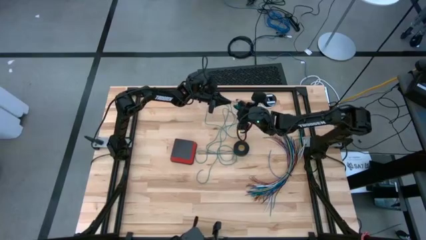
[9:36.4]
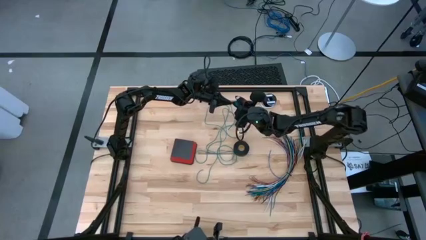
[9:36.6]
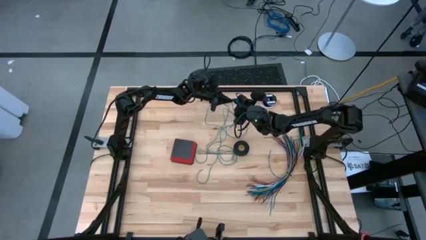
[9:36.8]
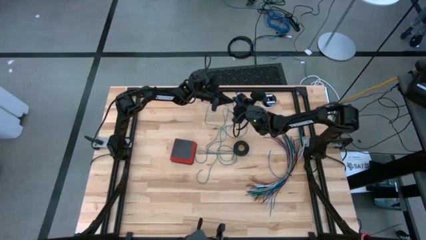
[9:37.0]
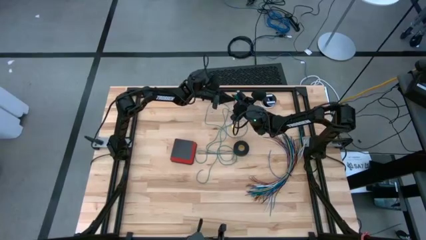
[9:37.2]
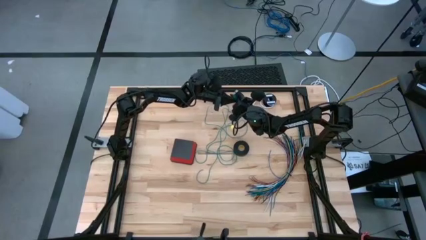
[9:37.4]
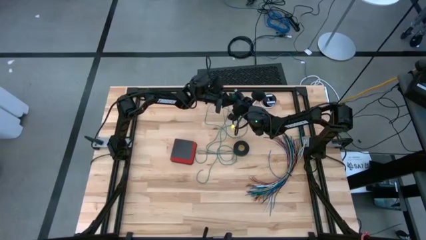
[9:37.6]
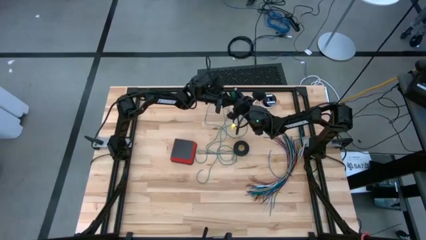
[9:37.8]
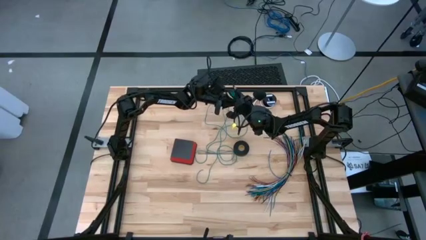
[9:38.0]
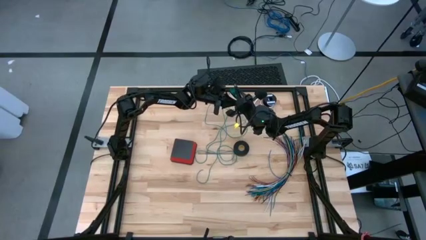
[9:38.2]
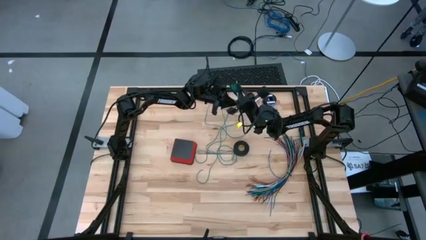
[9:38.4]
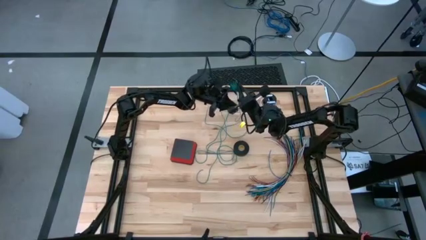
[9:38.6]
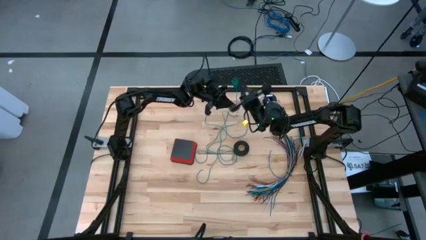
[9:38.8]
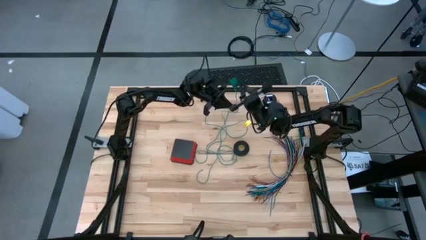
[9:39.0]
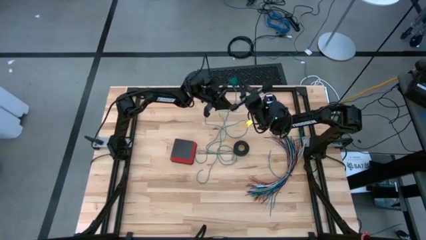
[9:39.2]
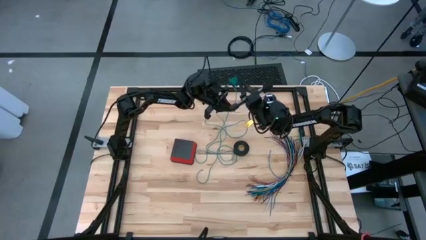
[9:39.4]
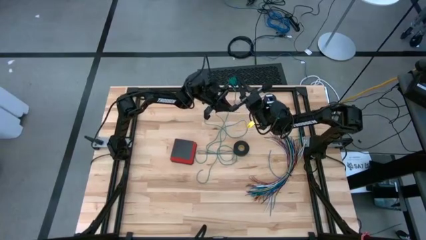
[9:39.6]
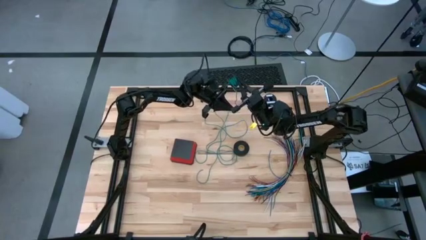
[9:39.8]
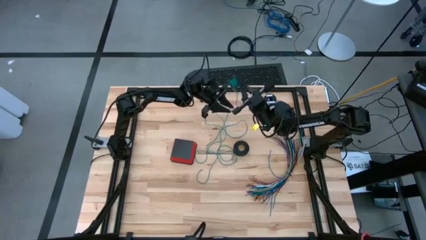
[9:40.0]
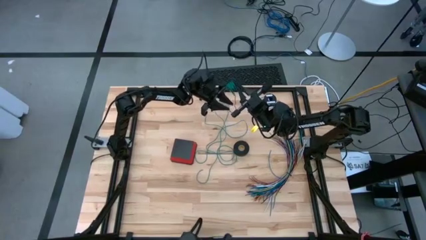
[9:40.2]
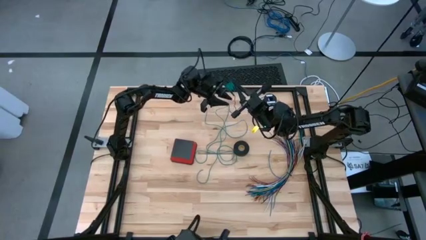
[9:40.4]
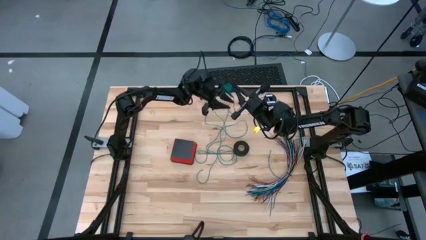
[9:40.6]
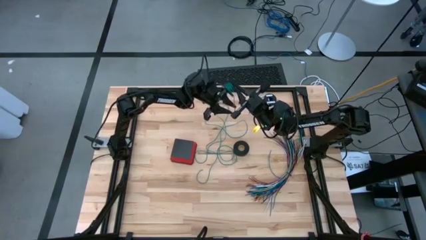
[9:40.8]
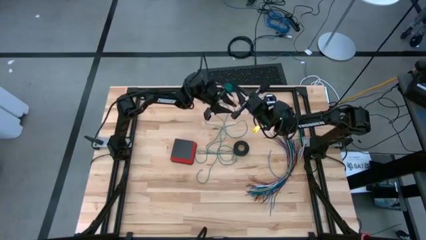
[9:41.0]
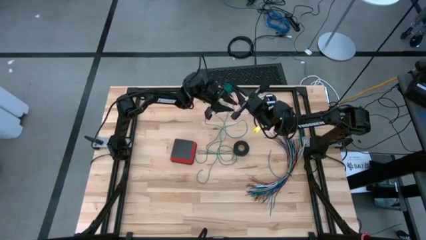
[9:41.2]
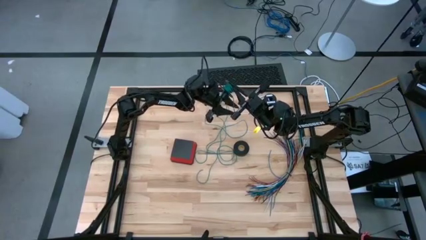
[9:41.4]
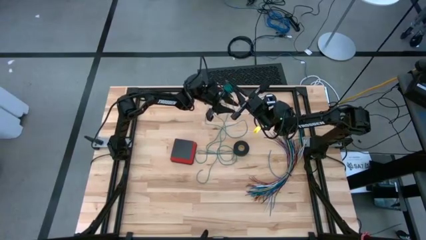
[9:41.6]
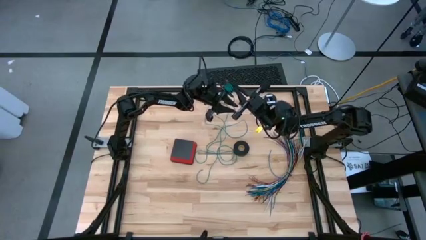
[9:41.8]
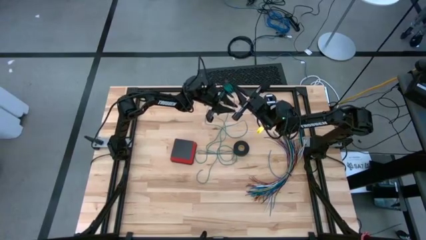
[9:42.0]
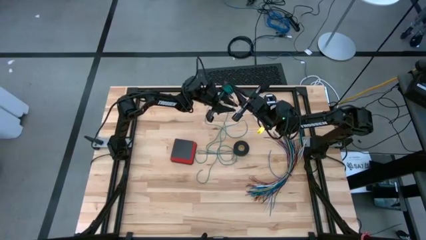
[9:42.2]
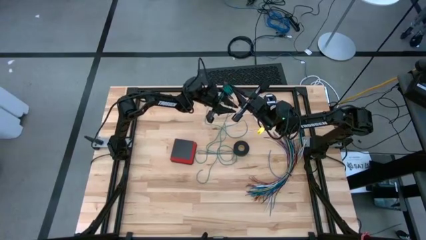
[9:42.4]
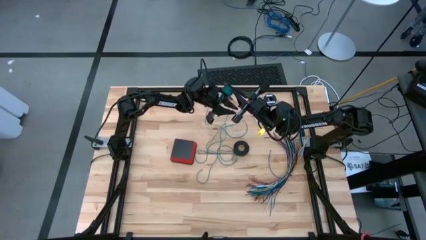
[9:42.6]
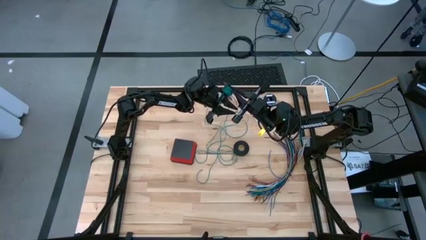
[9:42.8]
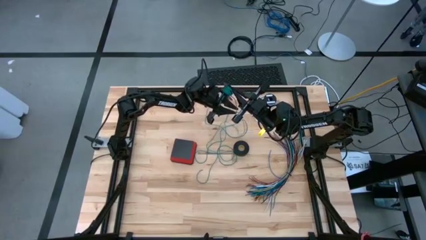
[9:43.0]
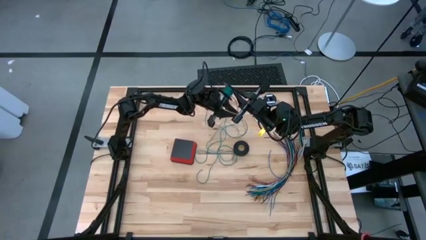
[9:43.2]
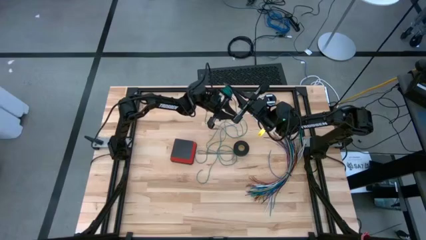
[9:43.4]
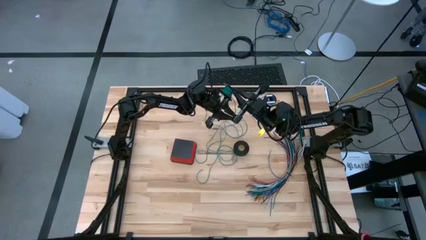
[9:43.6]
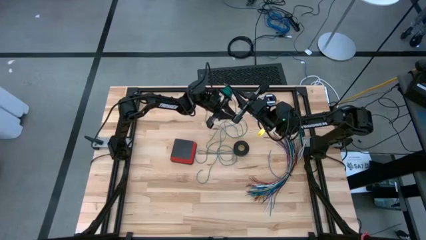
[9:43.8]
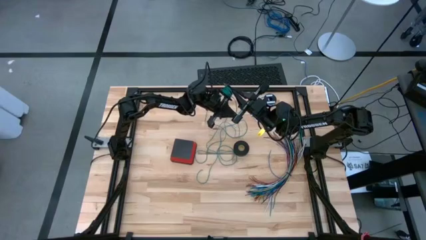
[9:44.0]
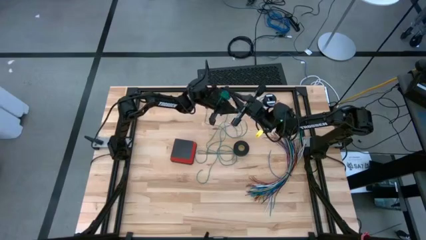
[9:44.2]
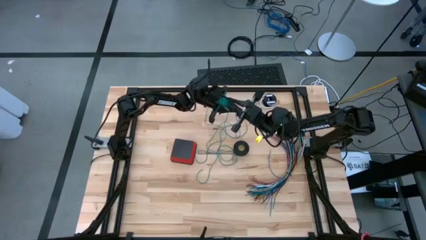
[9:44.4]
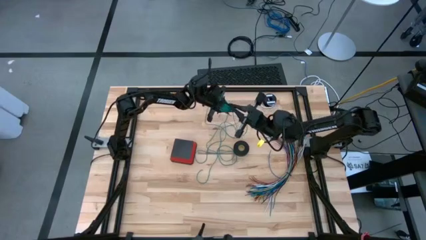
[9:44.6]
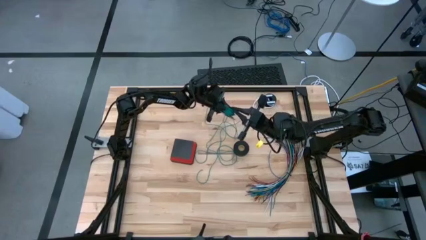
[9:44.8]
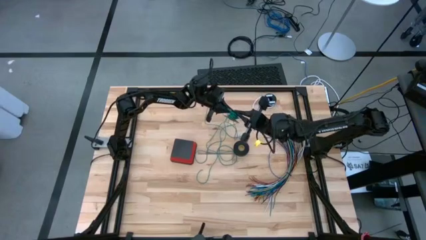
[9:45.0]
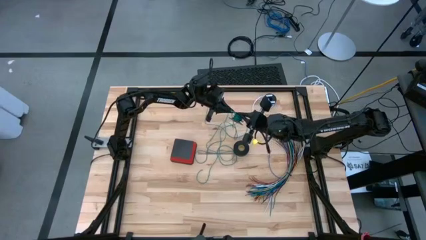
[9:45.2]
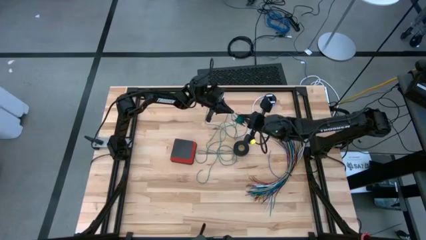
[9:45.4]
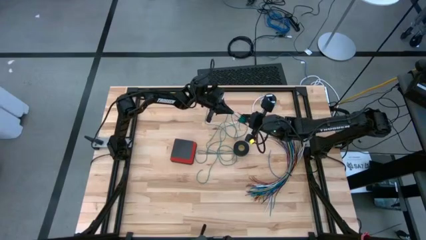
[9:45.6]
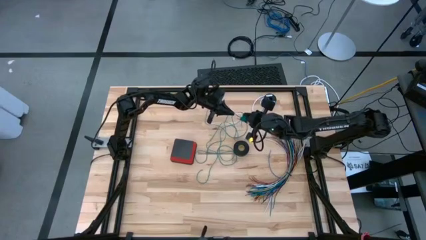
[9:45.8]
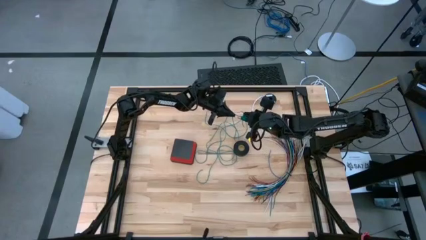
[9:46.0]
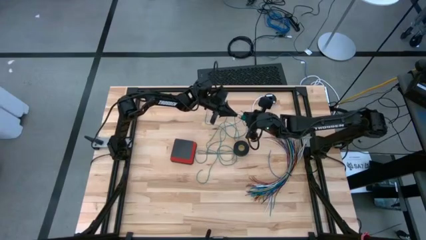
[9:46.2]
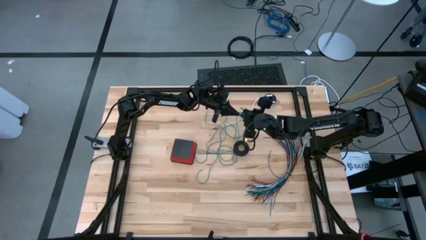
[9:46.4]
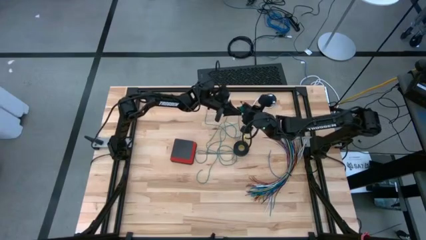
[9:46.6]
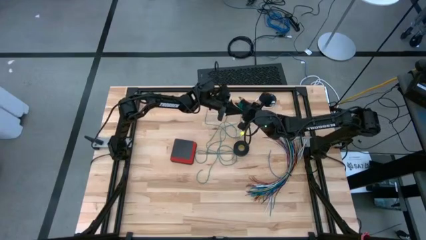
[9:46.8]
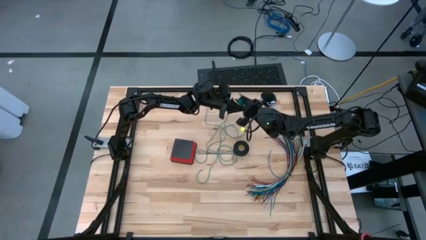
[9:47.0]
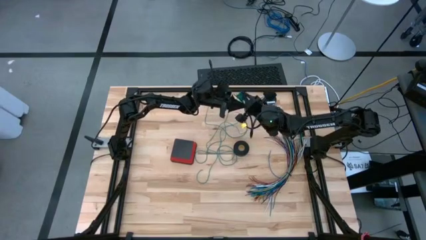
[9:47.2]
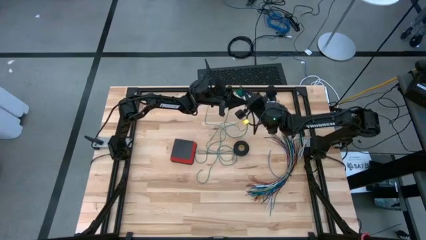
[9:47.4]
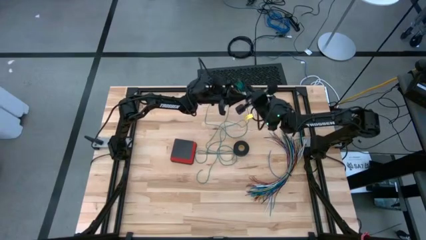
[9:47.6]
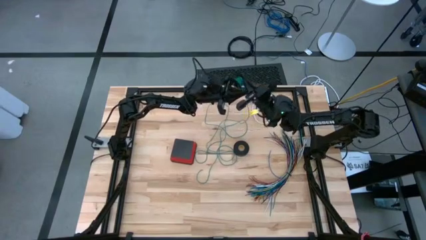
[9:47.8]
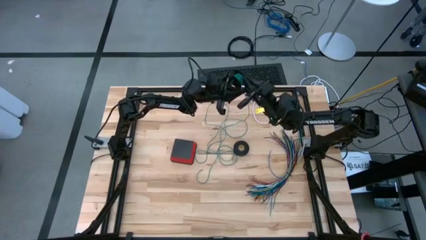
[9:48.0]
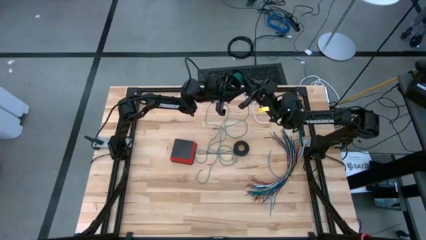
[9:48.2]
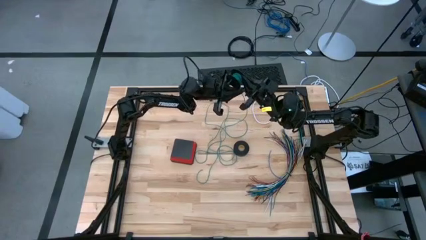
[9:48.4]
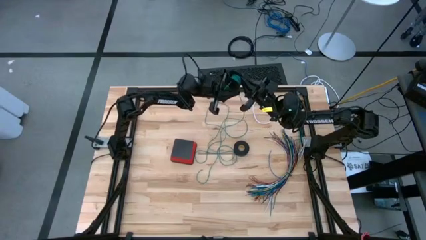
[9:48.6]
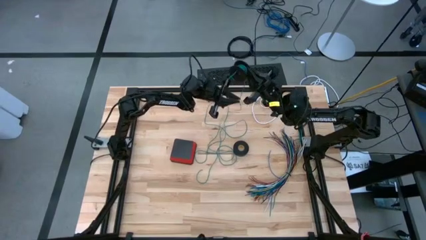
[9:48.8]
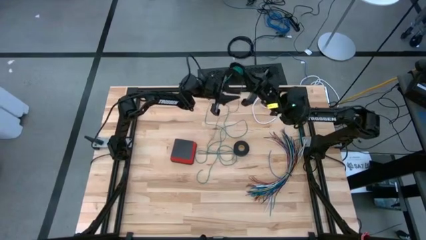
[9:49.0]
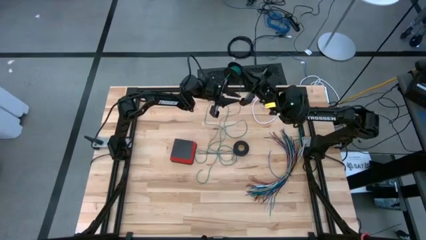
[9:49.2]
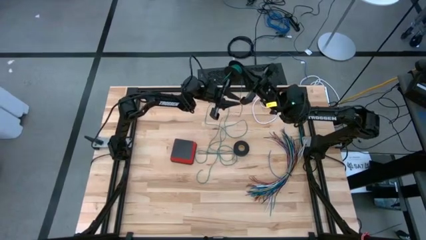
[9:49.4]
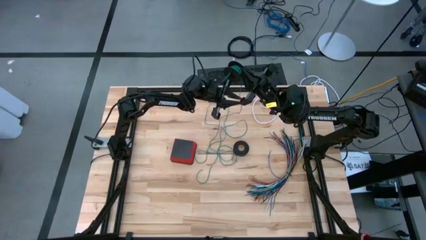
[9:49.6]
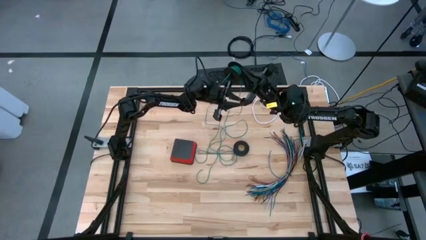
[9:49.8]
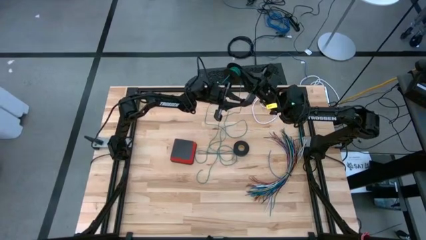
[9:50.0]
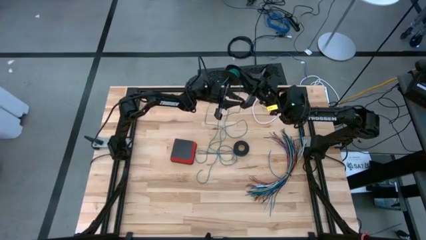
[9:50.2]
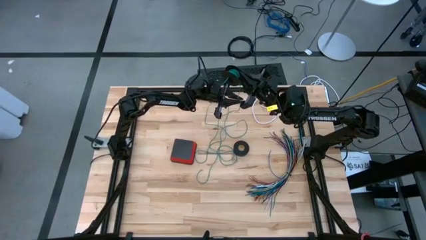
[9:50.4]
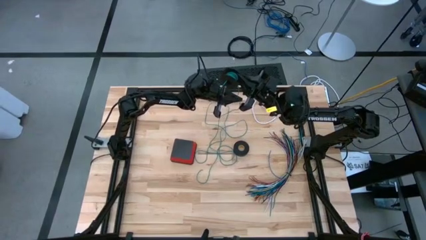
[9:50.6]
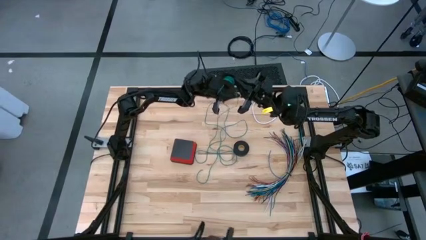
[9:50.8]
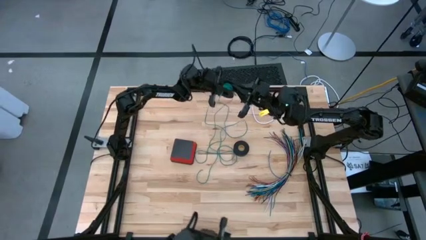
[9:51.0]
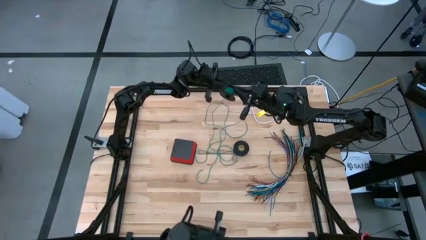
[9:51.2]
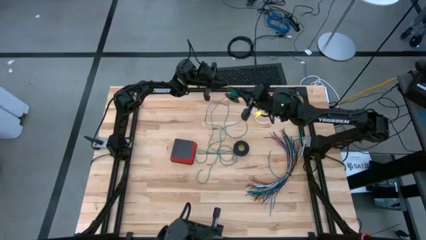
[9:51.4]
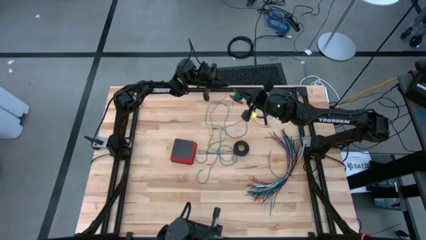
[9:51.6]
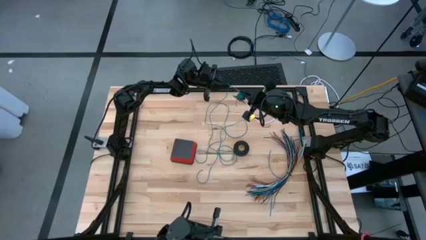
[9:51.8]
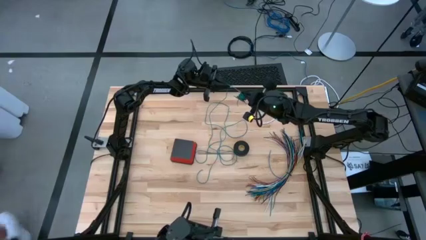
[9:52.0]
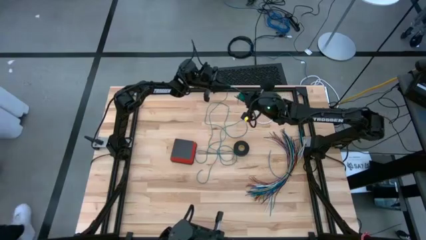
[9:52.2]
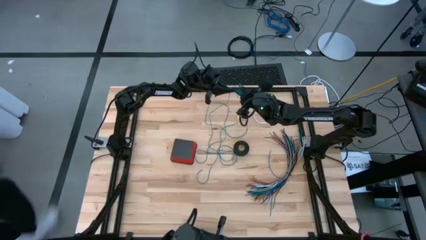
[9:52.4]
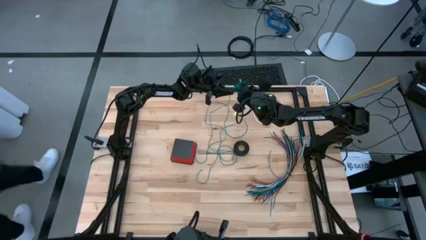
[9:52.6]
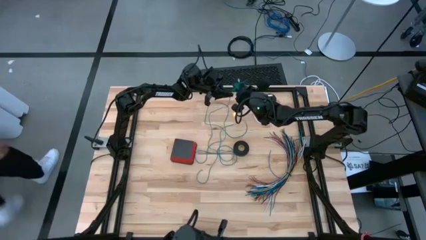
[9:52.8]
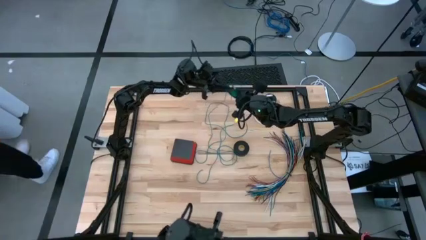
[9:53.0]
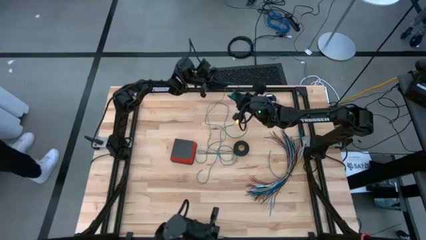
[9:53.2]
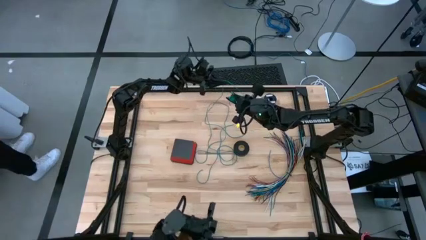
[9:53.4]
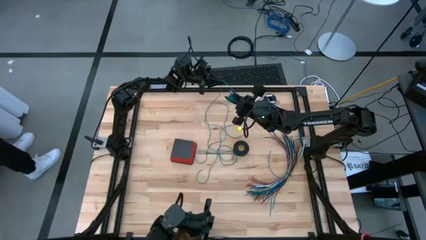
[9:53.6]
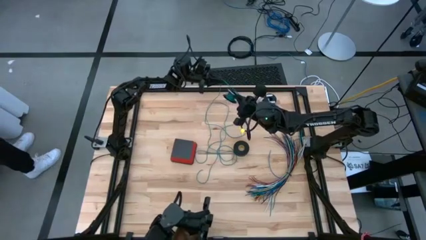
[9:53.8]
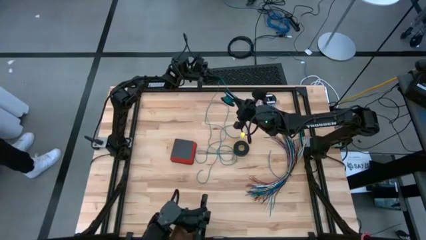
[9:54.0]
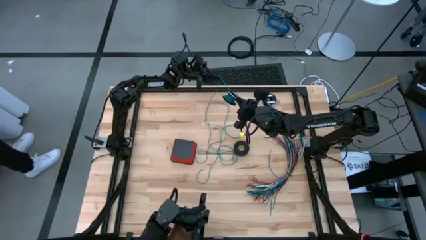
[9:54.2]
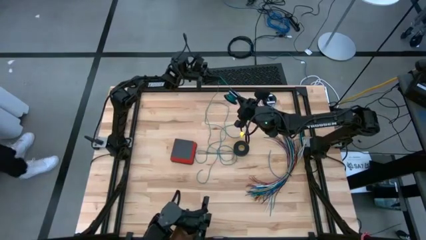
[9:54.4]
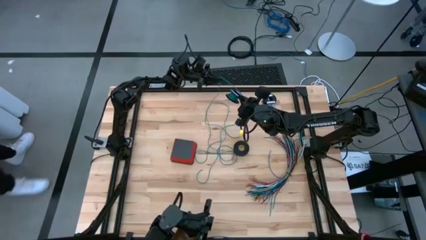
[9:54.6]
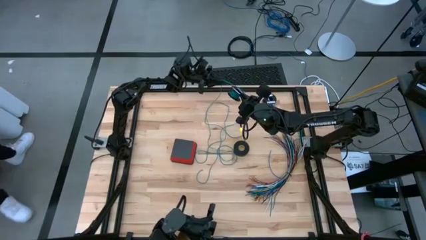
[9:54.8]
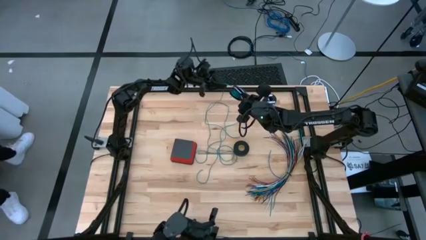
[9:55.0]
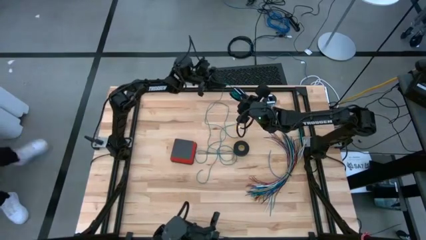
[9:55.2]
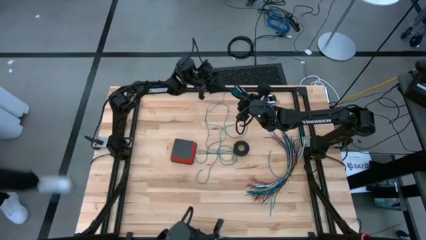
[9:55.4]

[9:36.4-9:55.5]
Task: Coiling cords
Coil the green wire cable on the spool
